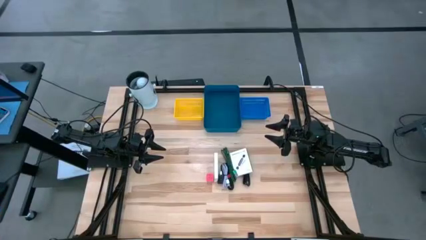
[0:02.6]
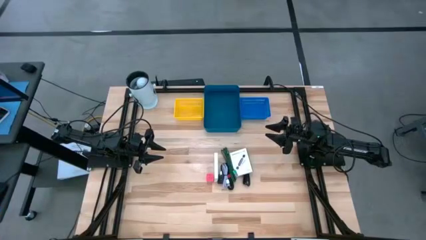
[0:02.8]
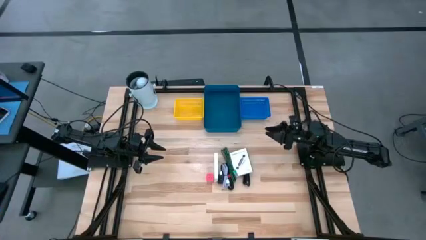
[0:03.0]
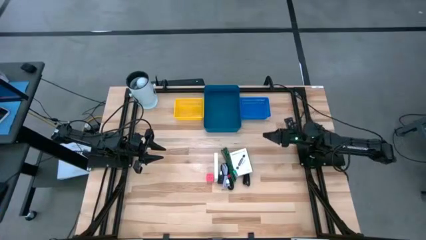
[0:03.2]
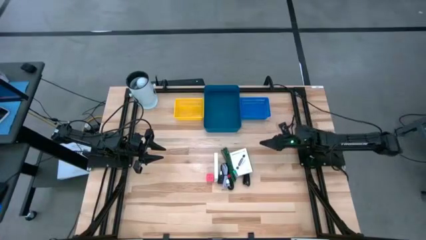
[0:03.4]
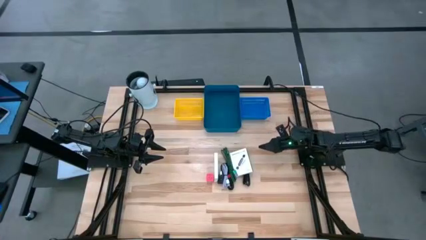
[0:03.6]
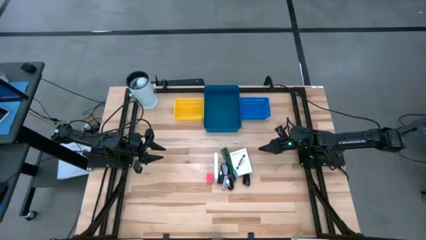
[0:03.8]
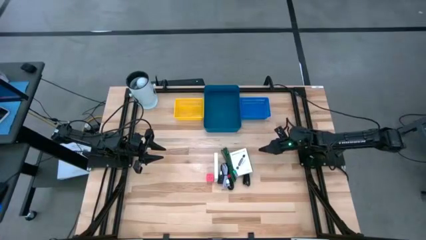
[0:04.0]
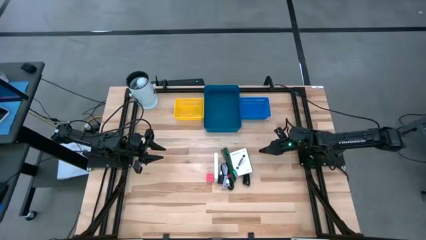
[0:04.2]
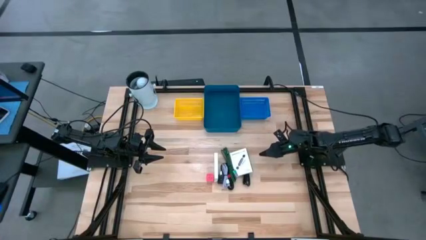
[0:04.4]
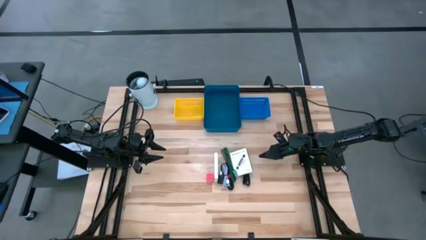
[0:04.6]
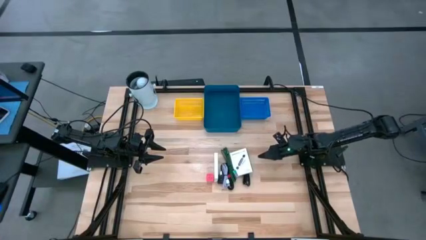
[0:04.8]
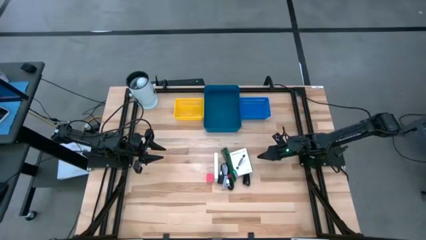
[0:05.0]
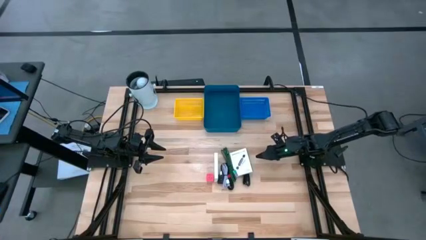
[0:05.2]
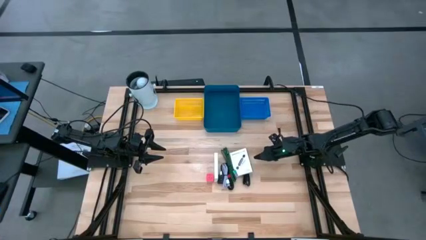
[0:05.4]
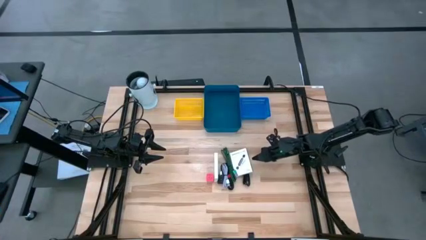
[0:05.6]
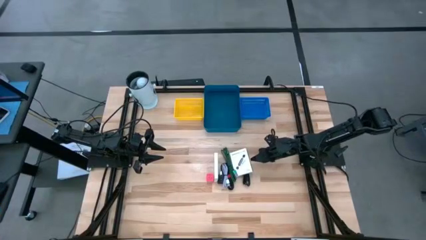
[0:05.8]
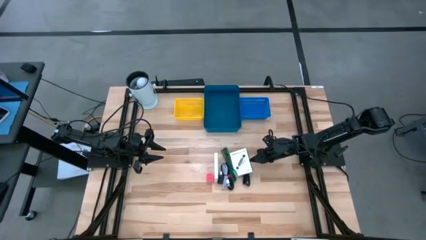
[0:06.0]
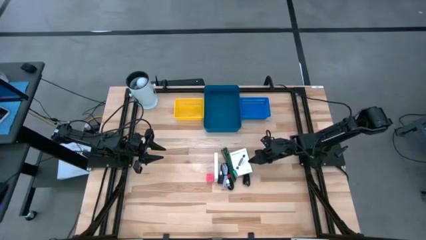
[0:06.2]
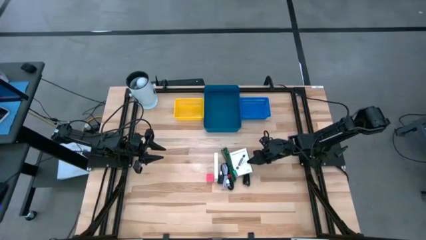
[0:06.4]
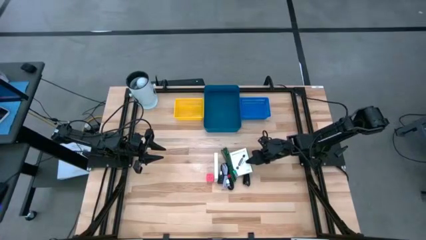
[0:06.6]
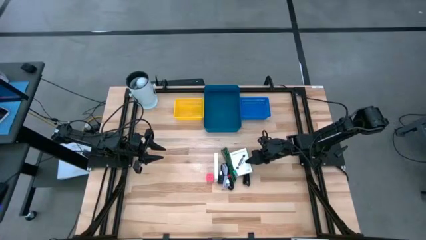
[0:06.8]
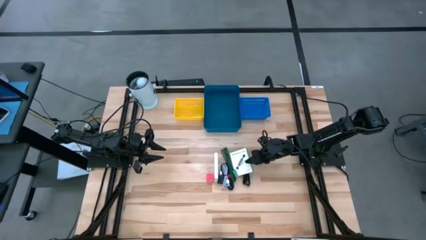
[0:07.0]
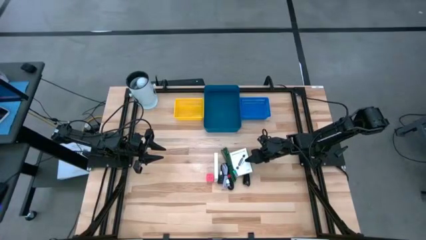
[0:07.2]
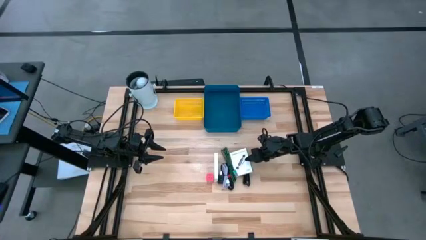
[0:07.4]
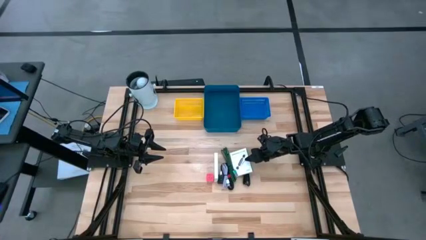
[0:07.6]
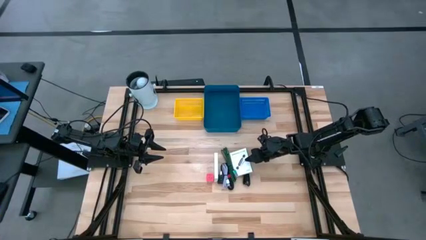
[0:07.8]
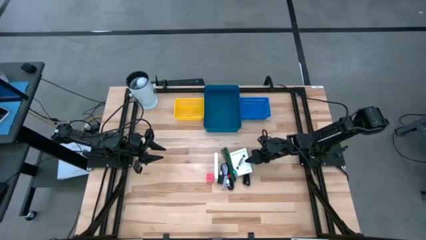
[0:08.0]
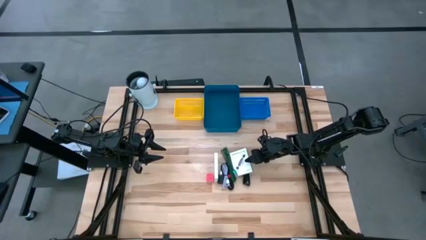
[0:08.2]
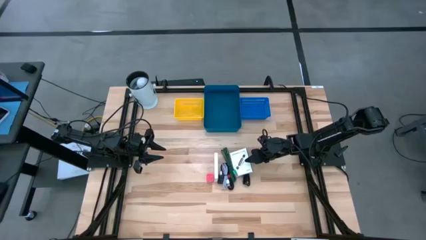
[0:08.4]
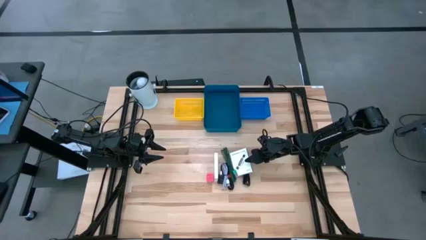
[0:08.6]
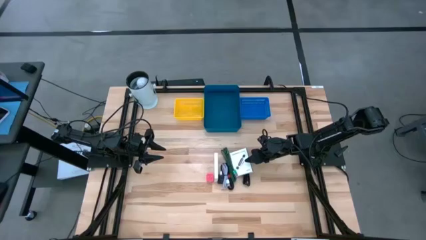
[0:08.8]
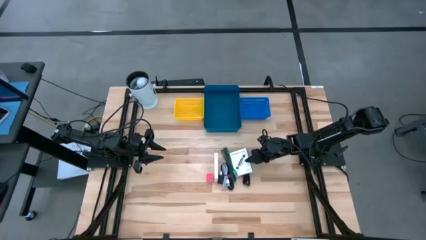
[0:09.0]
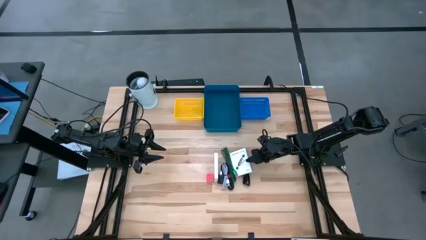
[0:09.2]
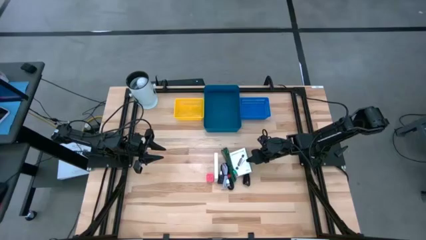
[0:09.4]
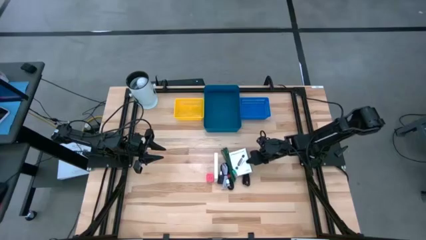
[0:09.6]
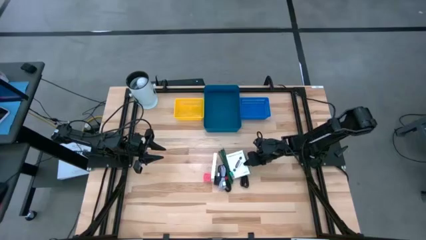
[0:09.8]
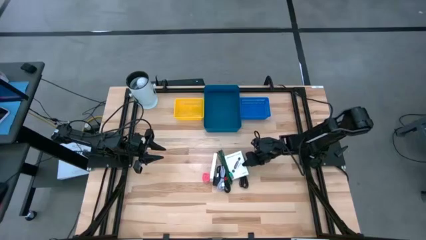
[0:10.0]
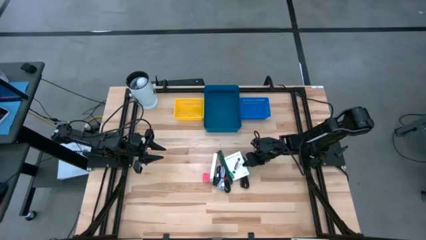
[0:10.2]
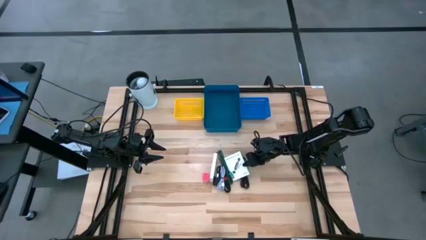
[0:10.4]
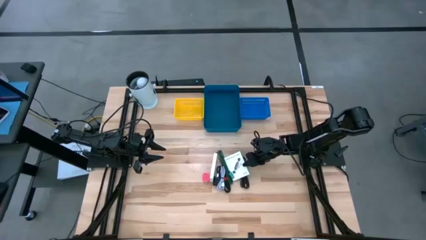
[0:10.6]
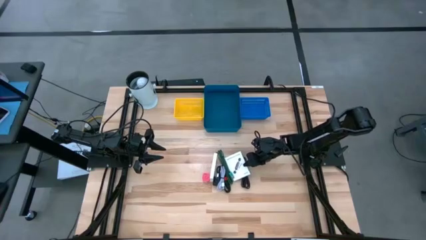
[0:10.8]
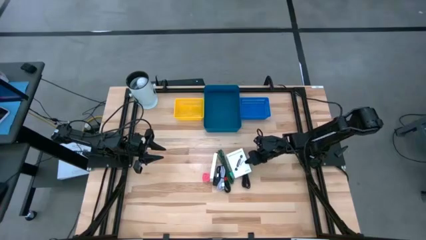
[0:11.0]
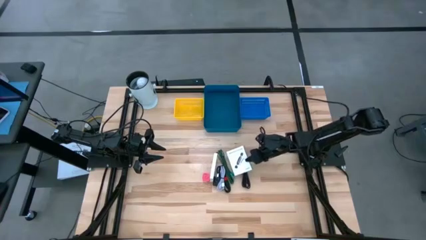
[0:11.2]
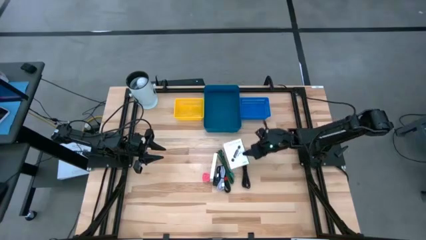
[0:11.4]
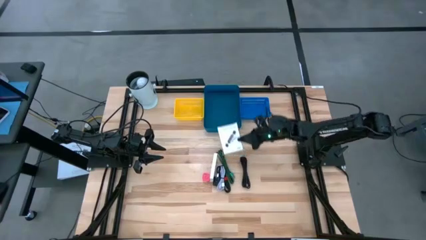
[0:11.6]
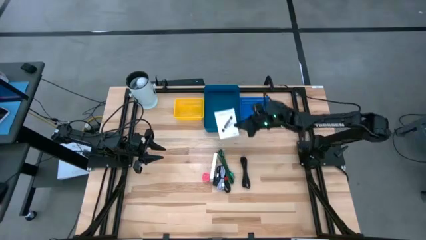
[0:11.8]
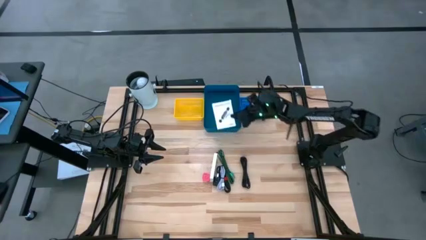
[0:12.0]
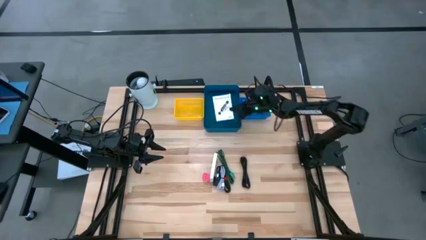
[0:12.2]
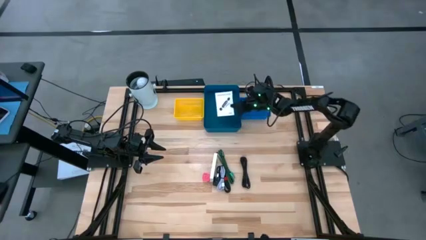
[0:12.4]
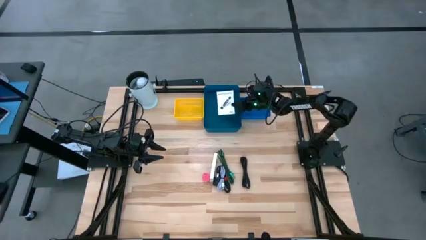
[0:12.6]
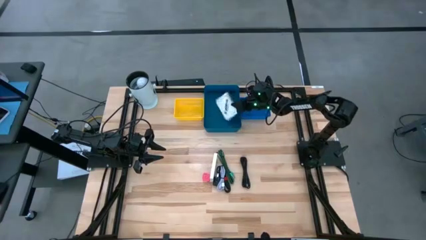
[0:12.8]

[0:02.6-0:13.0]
Task: Pick and place items into bin
Put the white card reader box into the large blue bin

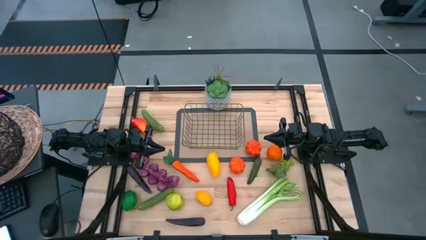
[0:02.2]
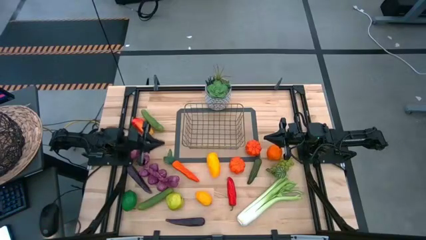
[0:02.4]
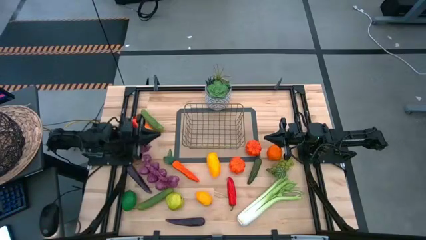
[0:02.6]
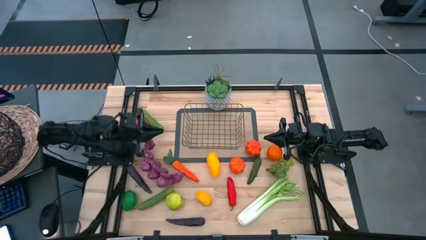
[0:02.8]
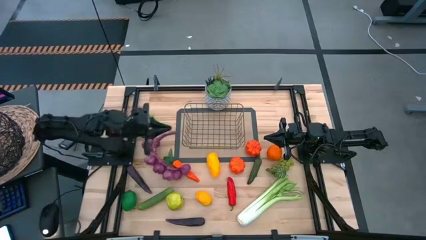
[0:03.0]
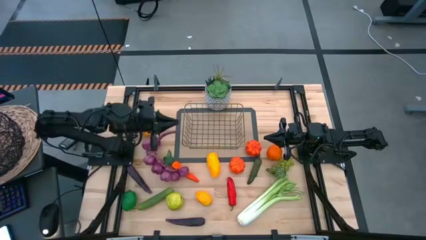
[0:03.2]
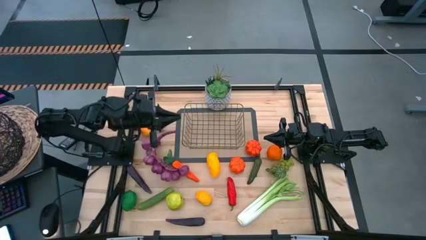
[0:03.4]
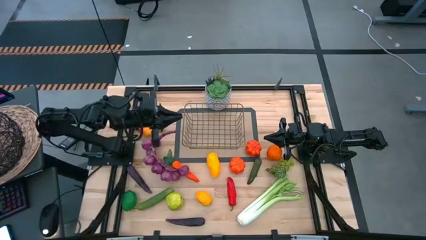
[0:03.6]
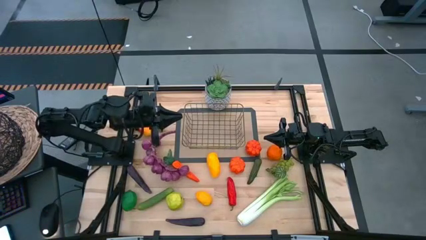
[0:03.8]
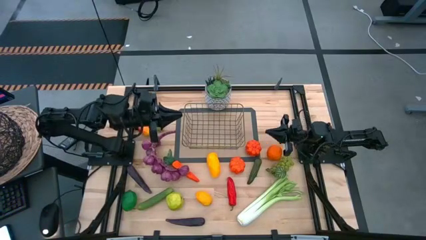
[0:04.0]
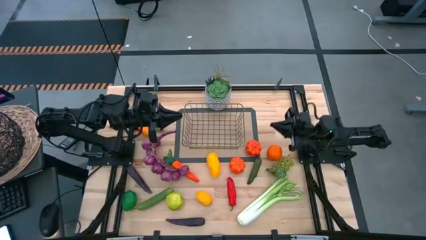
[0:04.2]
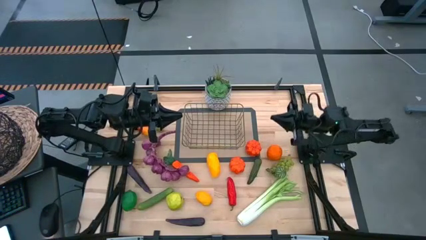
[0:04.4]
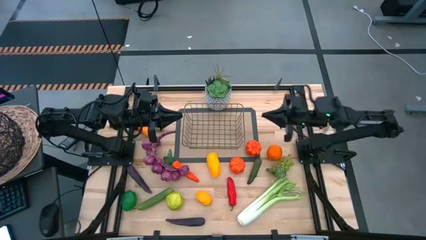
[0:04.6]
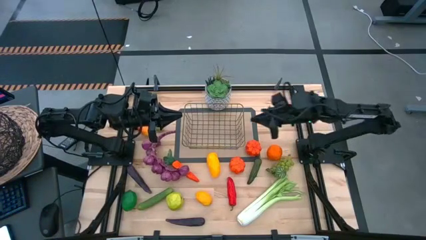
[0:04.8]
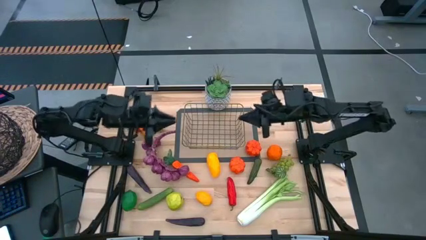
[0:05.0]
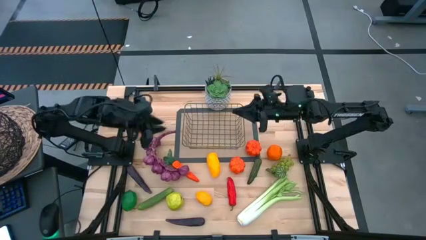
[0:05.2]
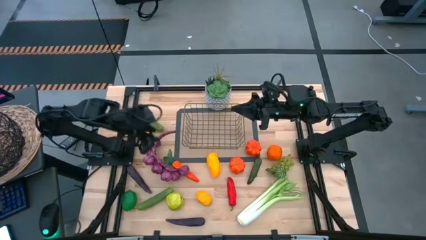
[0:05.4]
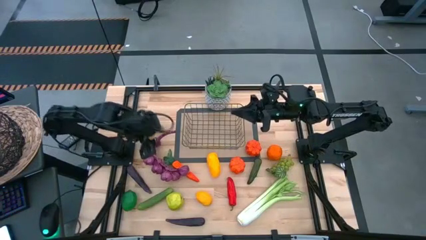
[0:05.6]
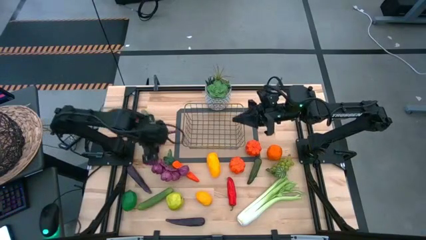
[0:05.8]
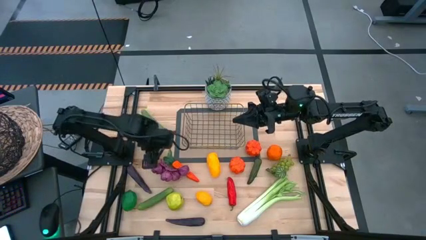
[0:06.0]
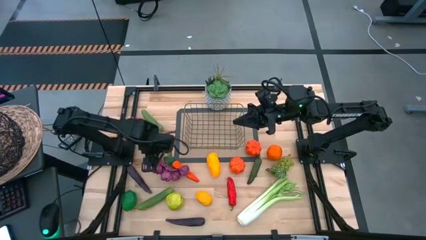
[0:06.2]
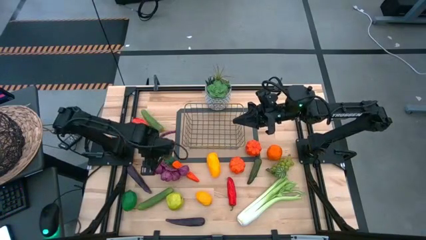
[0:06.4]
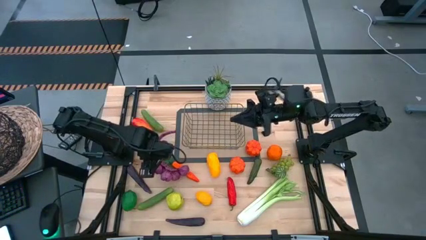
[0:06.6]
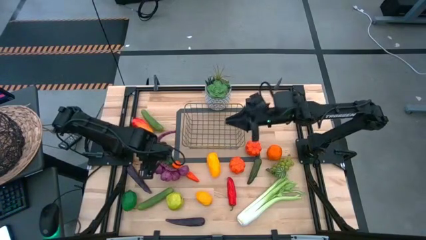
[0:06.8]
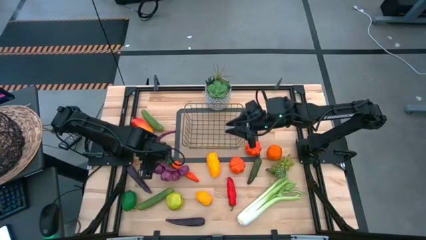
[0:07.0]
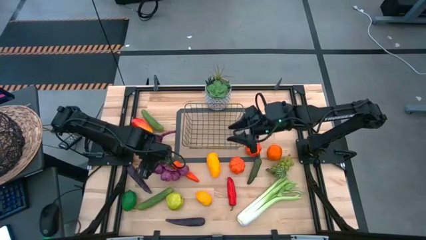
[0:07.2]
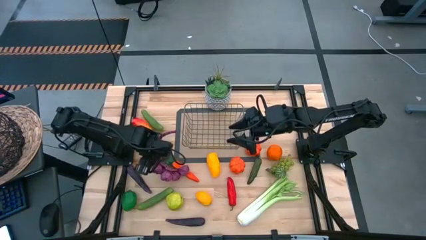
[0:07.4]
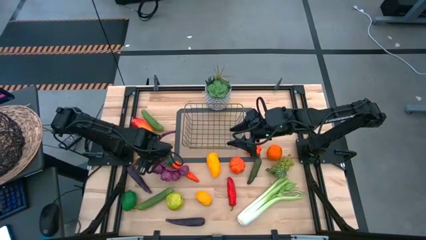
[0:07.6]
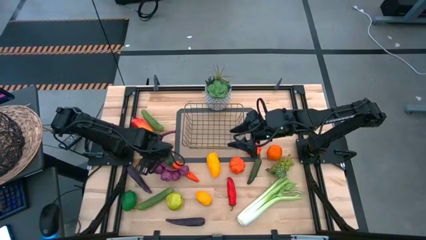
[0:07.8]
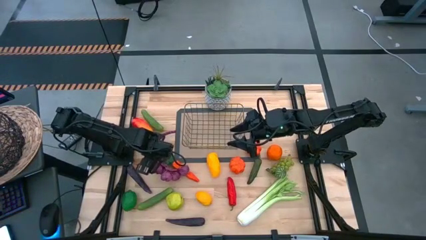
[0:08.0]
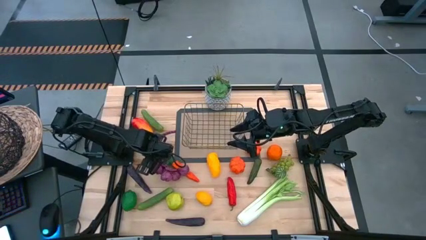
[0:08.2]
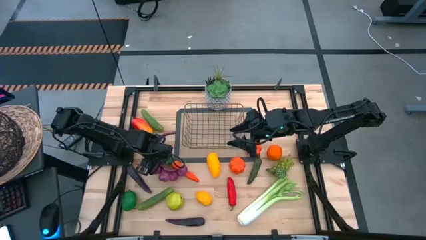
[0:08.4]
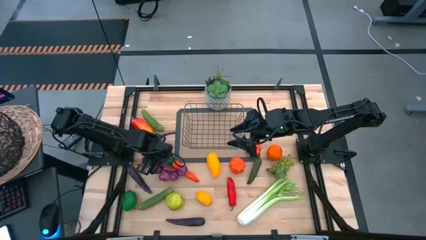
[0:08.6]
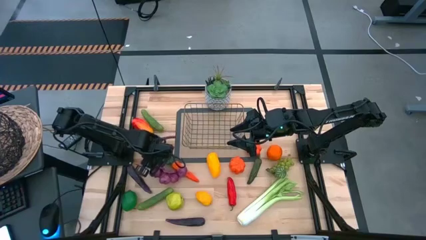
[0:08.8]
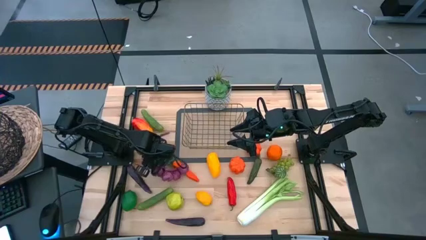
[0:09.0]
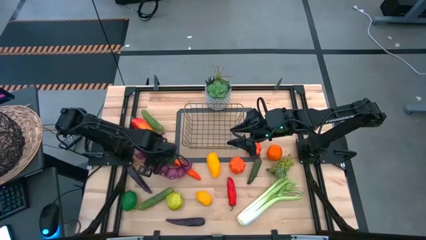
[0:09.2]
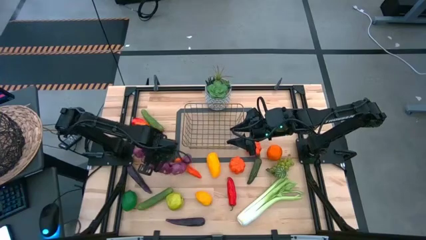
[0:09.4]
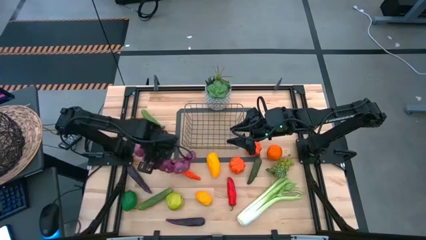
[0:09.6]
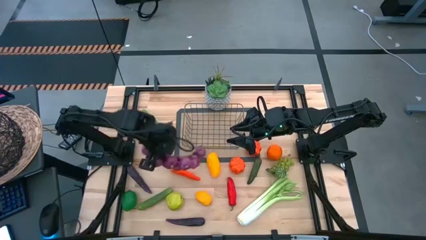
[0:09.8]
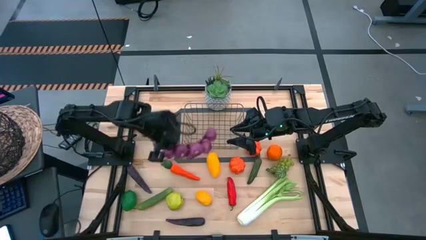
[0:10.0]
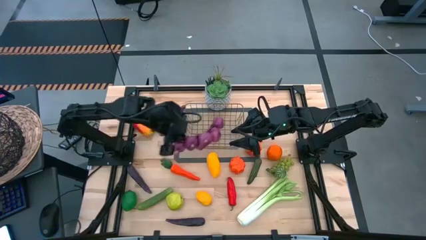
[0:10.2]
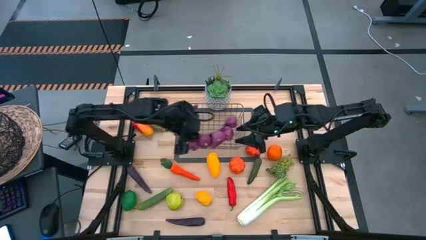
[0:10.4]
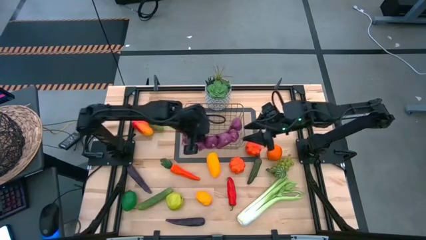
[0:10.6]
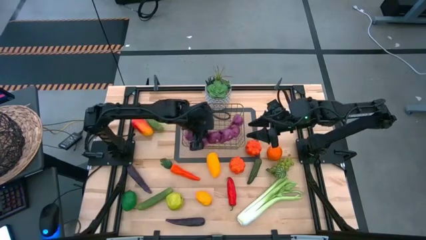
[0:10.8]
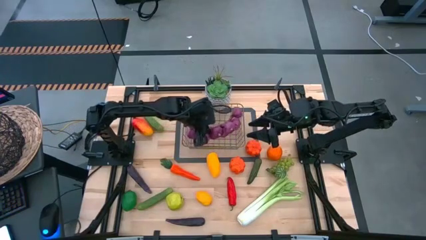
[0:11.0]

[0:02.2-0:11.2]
Task: Build produce basket
Put the onions into the wire basket
